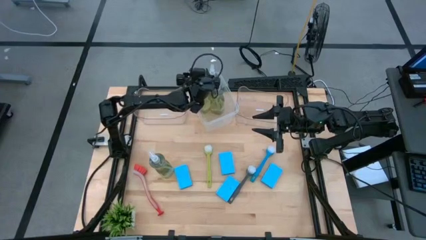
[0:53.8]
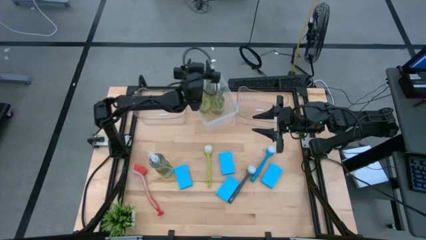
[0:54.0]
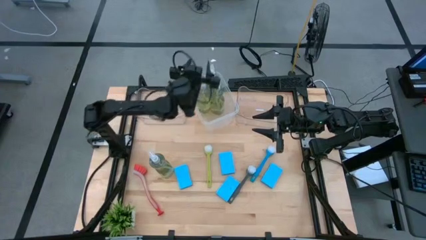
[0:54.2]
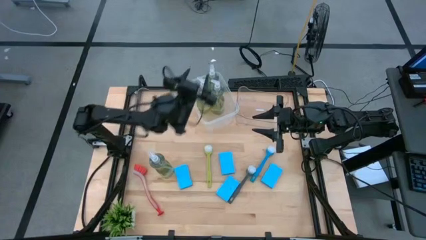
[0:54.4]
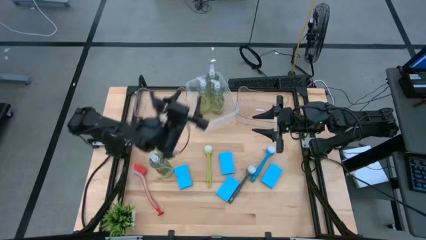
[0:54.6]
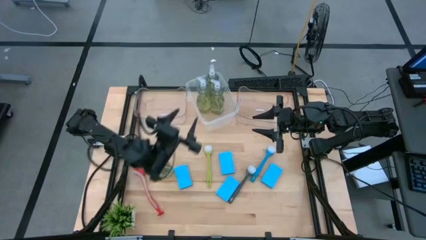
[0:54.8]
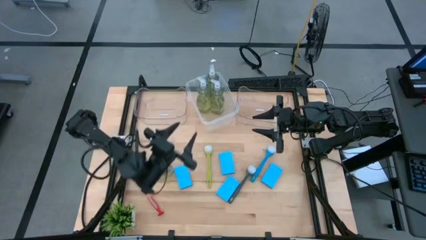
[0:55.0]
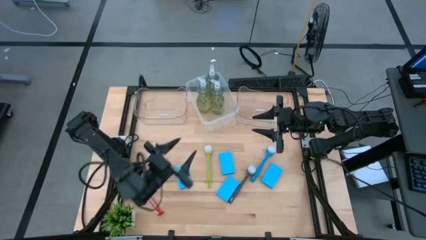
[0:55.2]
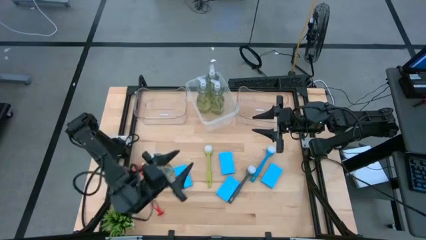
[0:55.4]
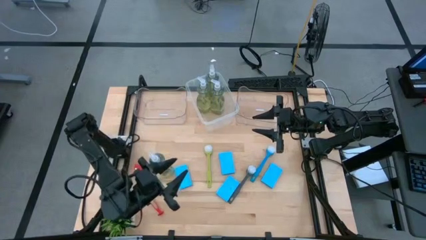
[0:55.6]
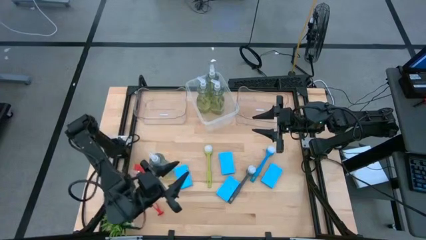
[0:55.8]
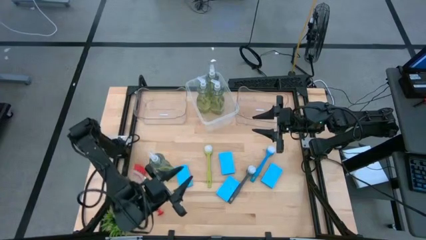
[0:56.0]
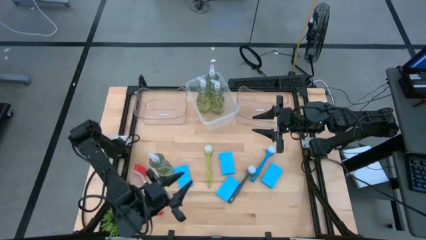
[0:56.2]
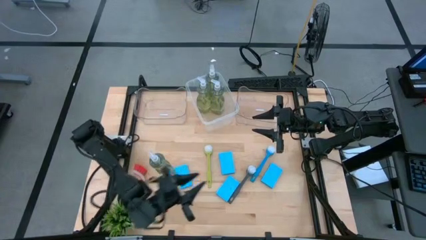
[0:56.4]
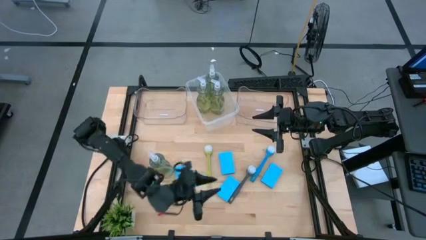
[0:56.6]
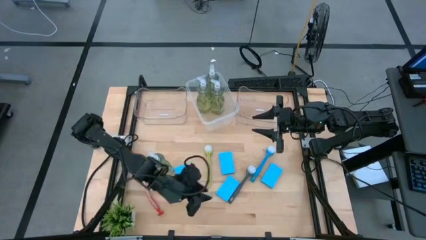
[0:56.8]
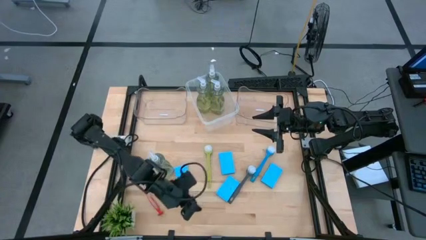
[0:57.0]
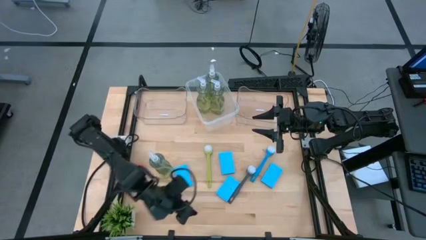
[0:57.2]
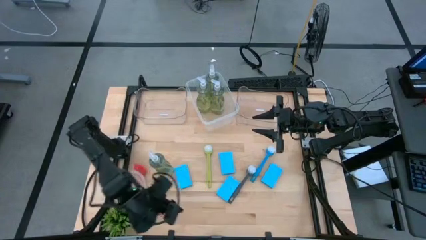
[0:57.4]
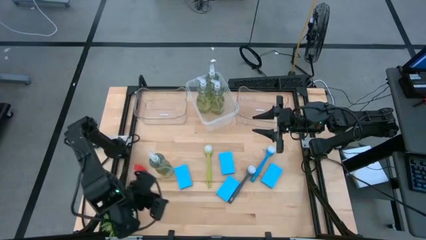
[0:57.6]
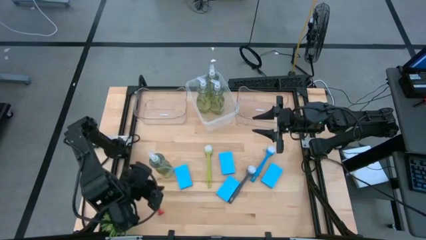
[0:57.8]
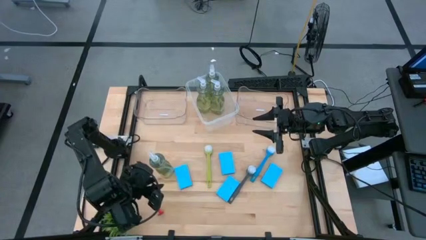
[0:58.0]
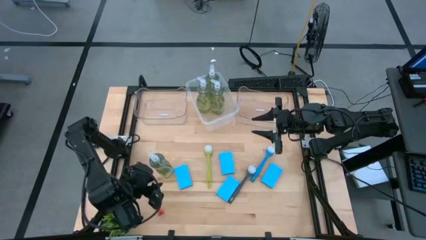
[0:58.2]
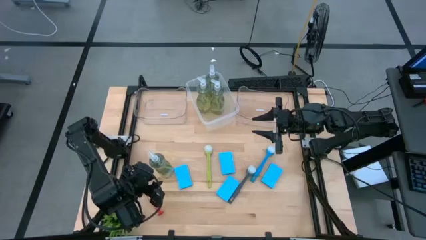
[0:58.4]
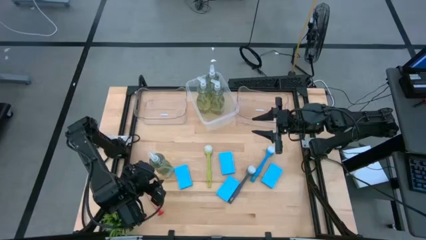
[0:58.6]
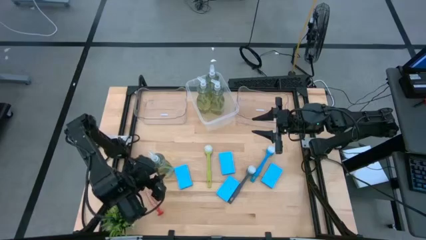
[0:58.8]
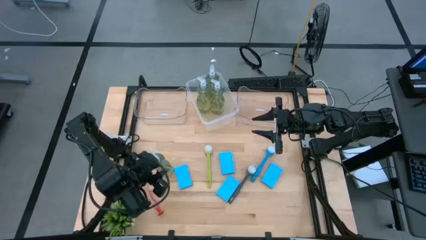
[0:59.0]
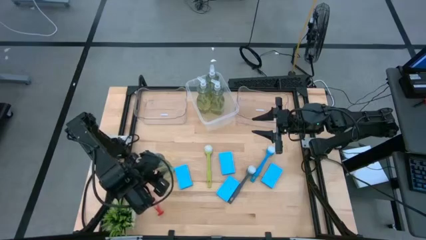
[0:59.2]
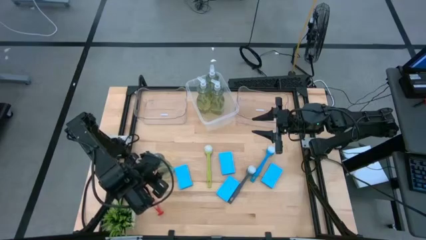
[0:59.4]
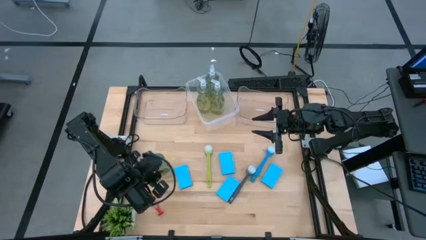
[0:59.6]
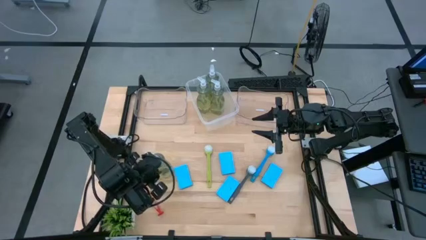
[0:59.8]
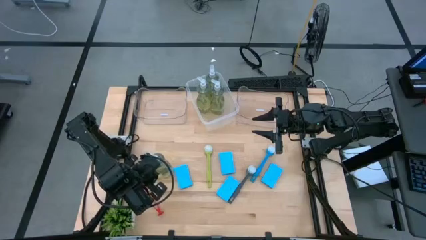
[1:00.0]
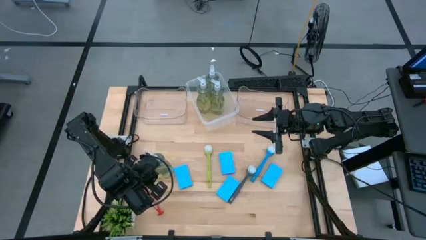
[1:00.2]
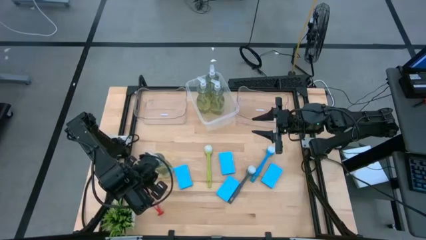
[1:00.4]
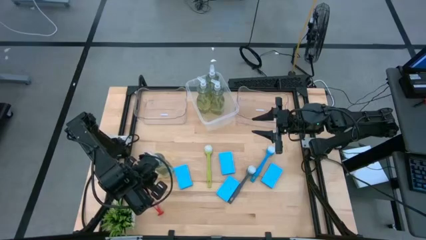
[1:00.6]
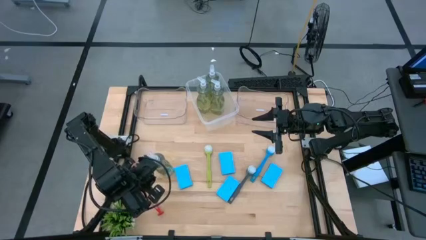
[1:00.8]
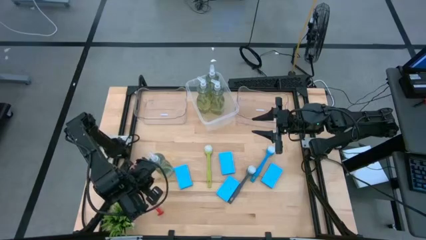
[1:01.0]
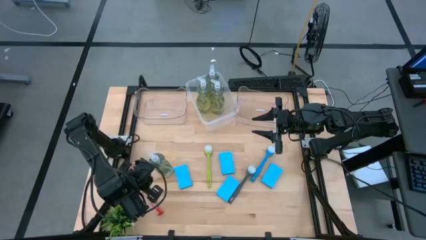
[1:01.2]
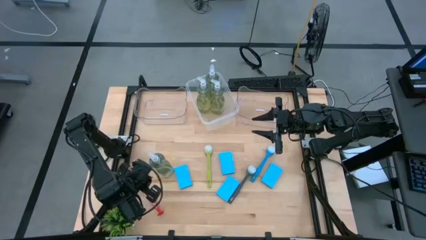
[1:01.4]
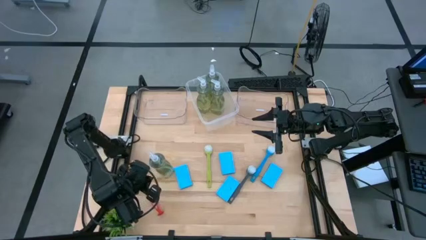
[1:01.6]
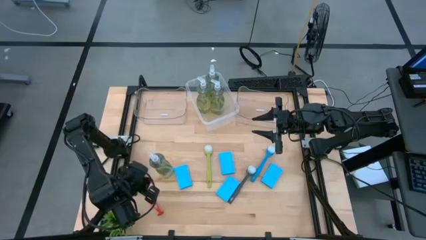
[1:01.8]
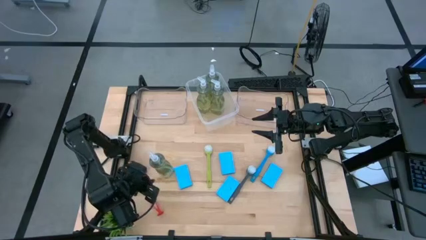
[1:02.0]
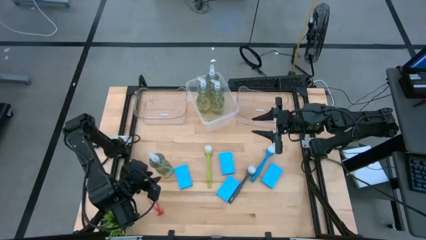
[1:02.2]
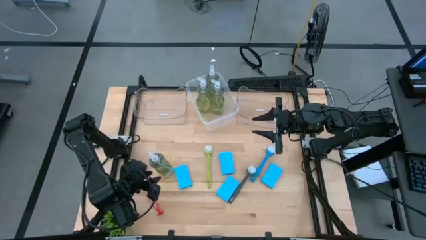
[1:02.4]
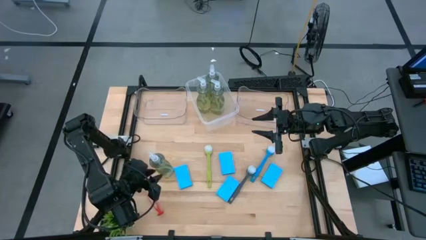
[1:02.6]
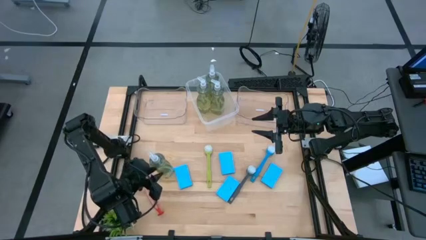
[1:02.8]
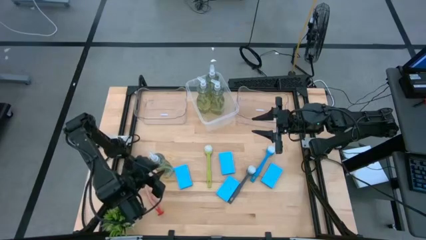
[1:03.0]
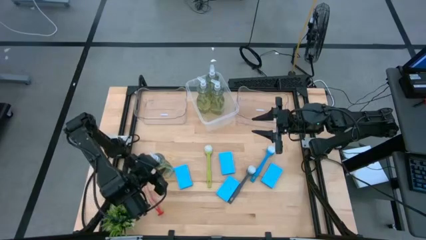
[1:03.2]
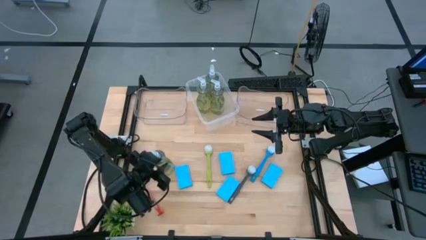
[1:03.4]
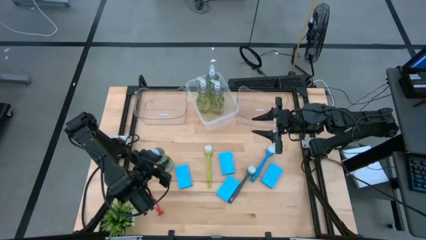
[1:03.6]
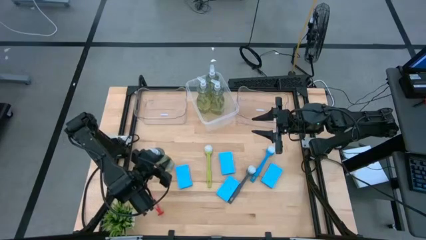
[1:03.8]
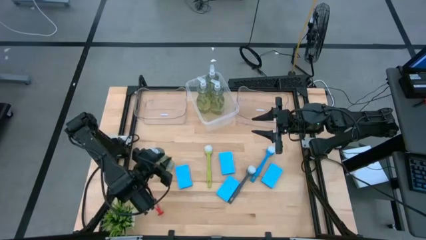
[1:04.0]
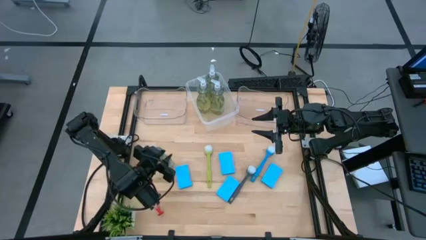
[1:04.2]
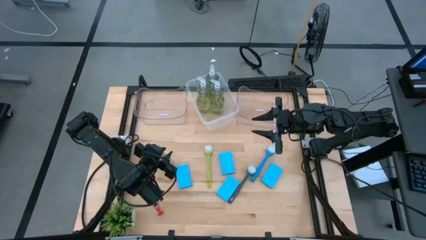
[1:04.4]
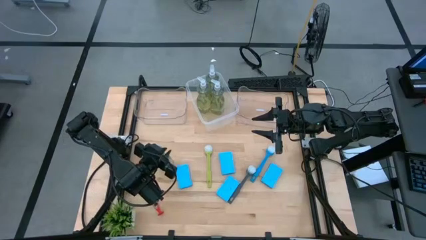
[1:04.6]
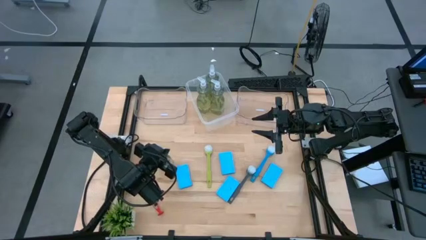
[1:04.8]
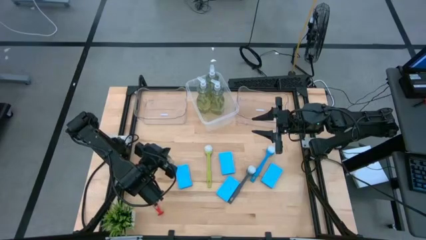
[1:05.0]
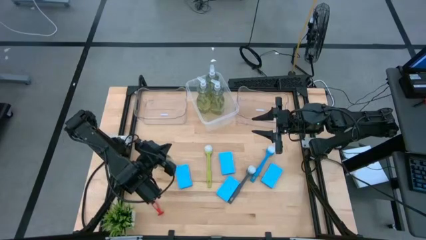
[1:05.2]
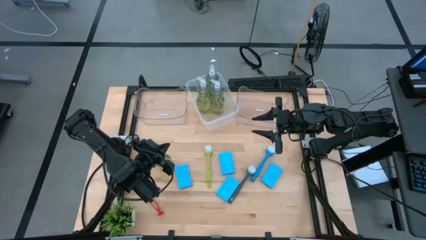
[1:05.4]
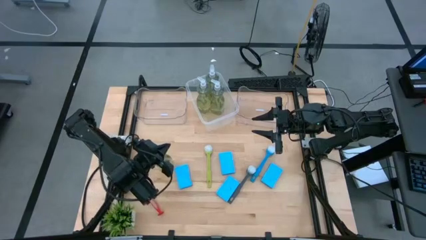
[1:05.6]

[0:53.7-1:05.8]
Task: Pick & Place Kitchen Sink Supplies
Put the liquid dishwashing soap into the middle transparent bin
